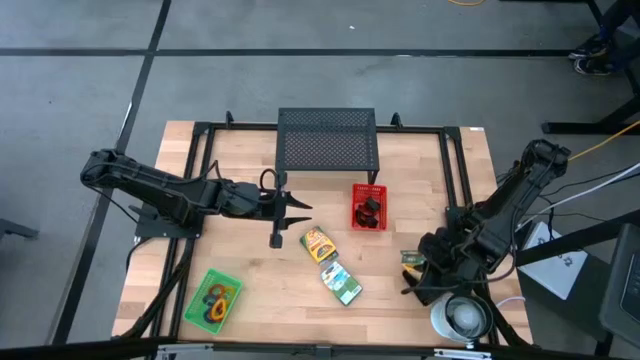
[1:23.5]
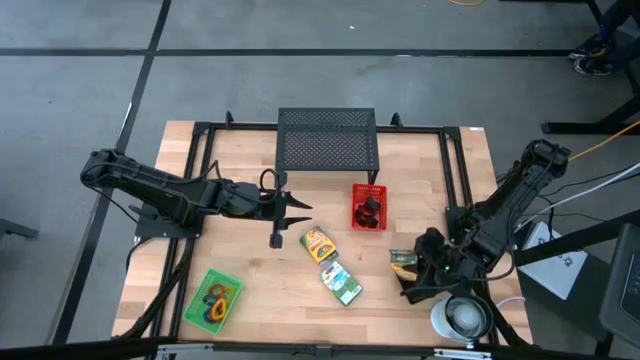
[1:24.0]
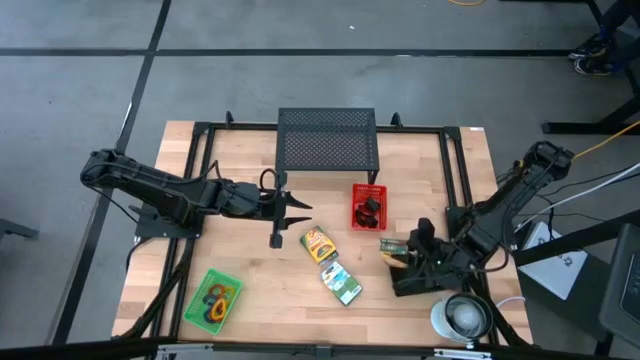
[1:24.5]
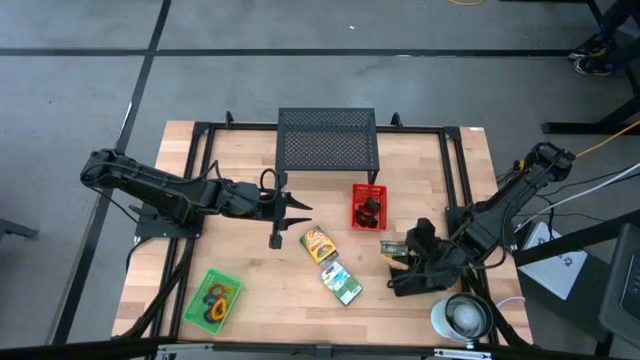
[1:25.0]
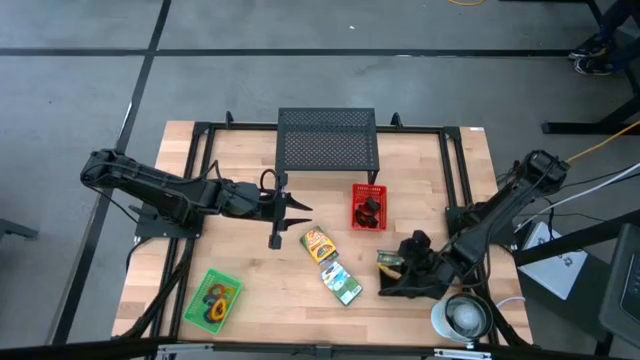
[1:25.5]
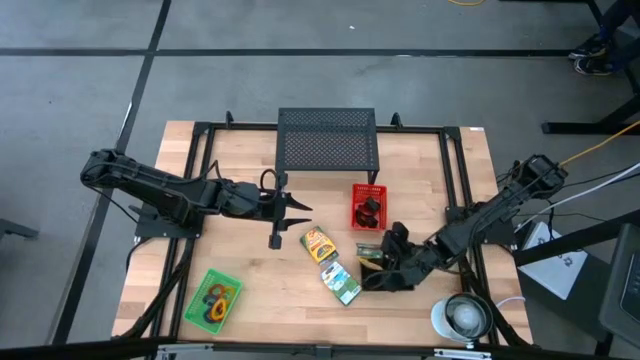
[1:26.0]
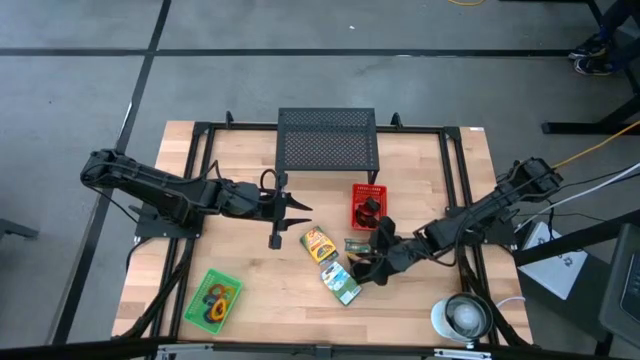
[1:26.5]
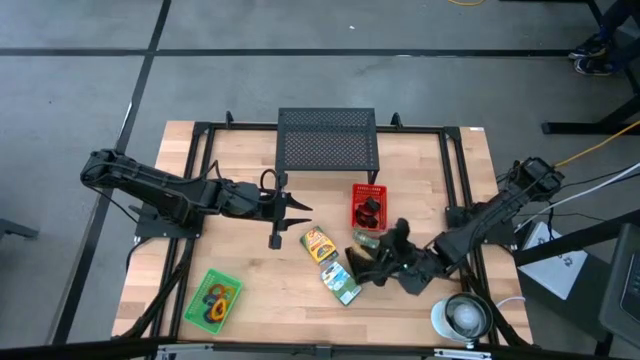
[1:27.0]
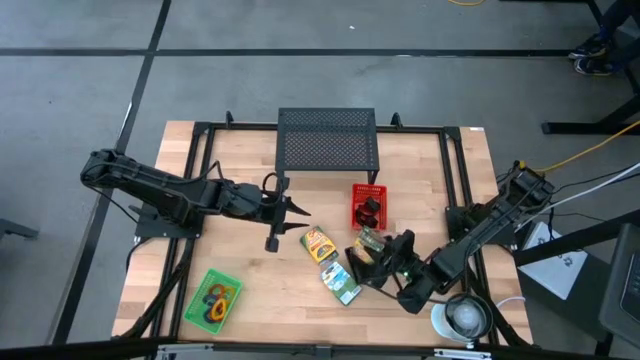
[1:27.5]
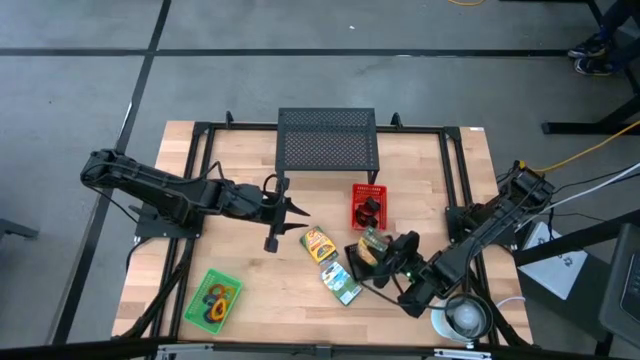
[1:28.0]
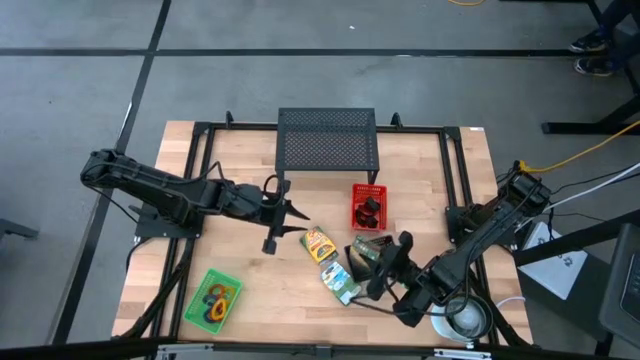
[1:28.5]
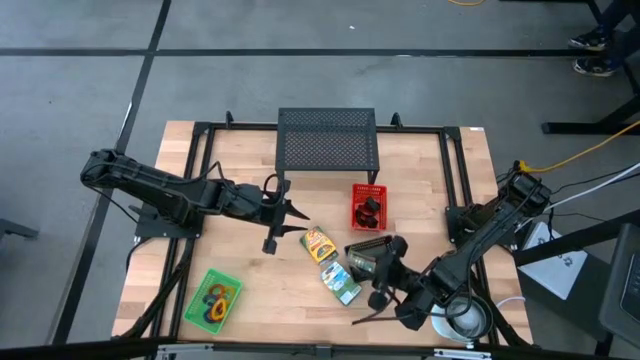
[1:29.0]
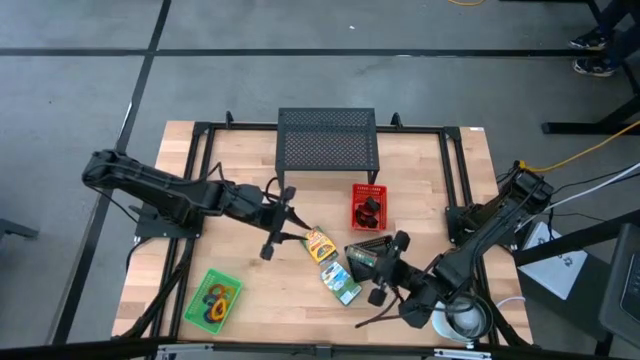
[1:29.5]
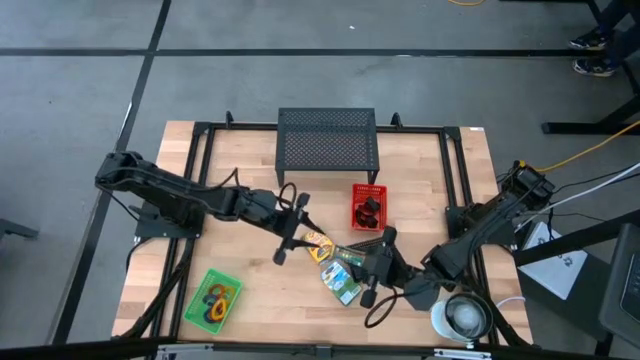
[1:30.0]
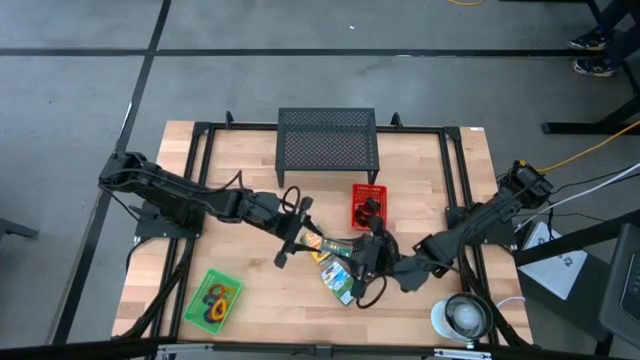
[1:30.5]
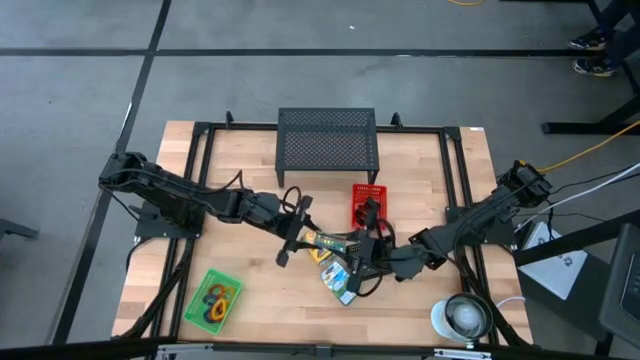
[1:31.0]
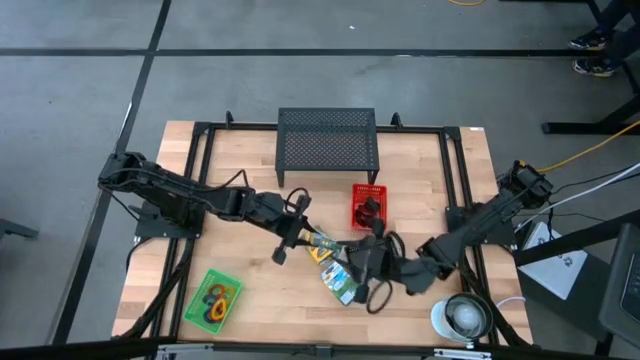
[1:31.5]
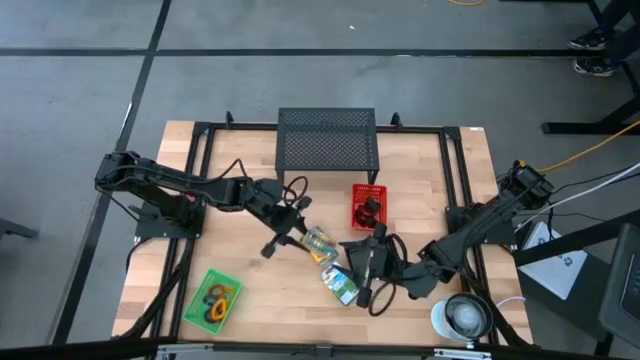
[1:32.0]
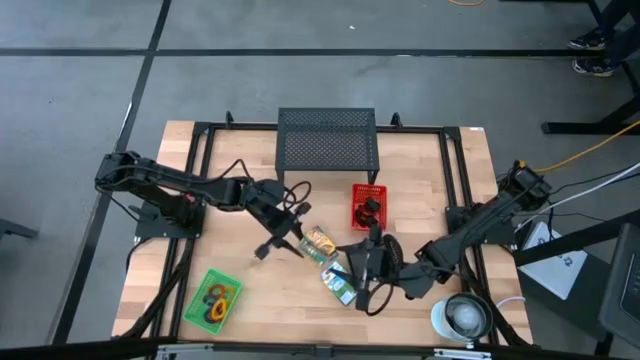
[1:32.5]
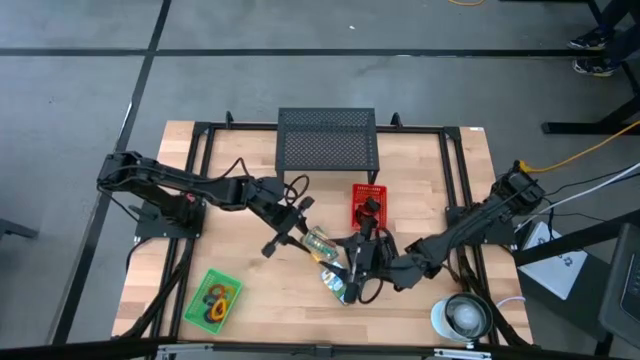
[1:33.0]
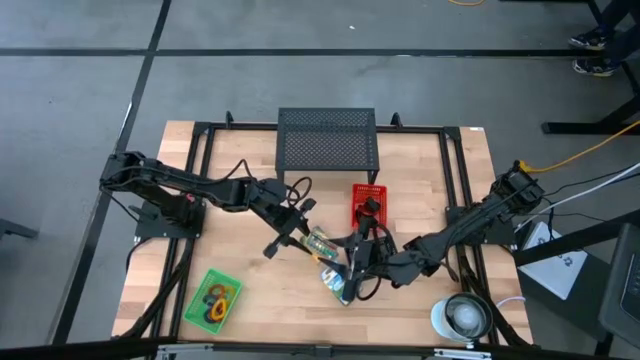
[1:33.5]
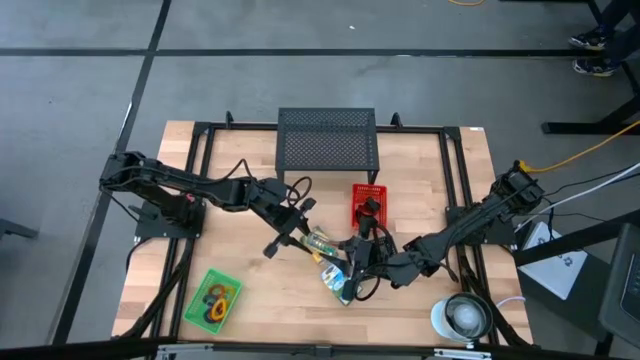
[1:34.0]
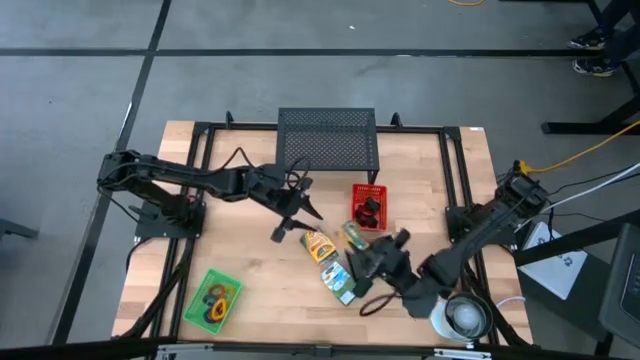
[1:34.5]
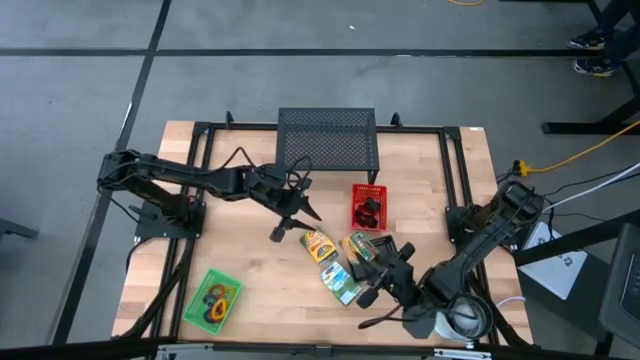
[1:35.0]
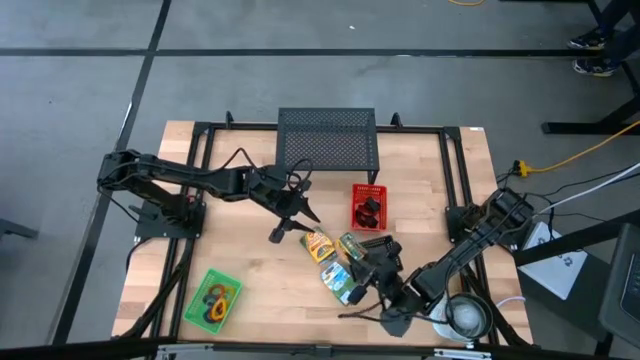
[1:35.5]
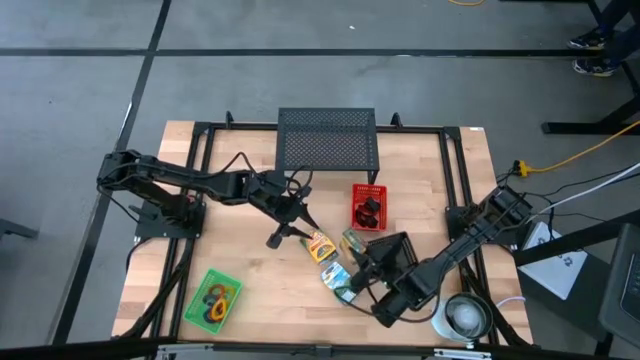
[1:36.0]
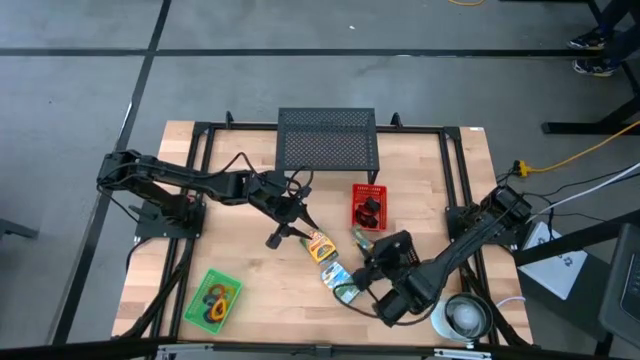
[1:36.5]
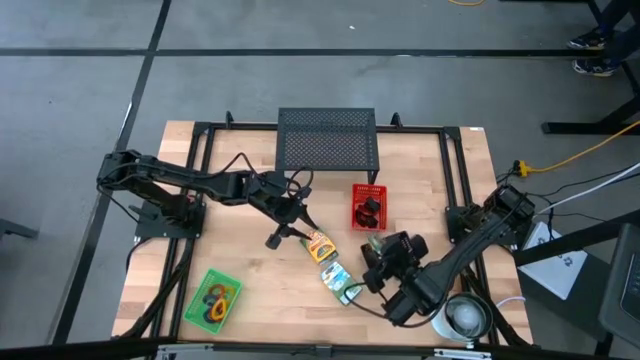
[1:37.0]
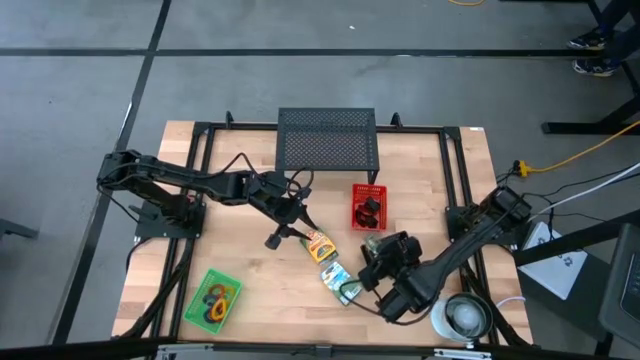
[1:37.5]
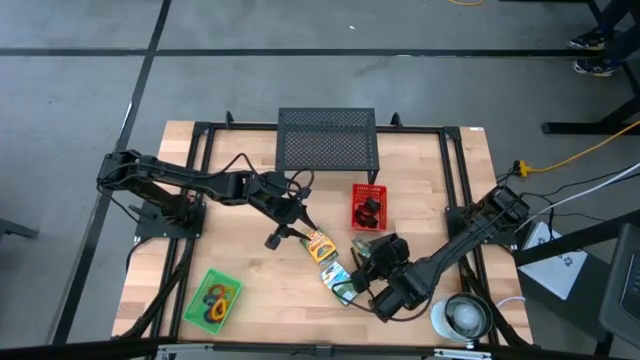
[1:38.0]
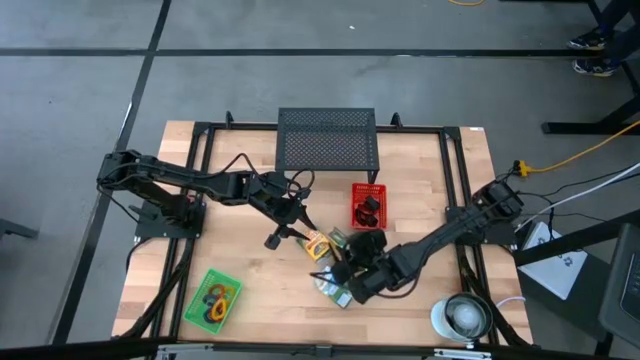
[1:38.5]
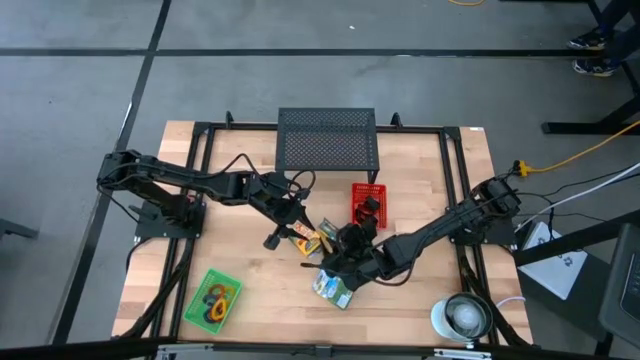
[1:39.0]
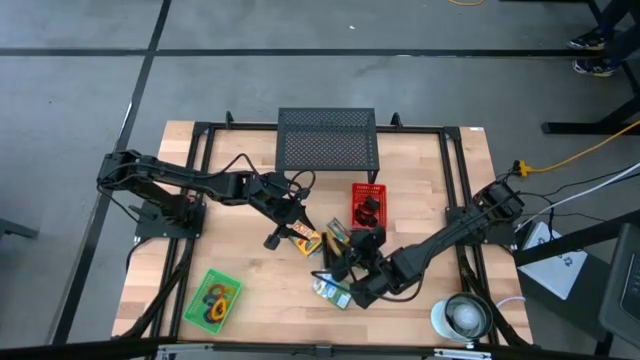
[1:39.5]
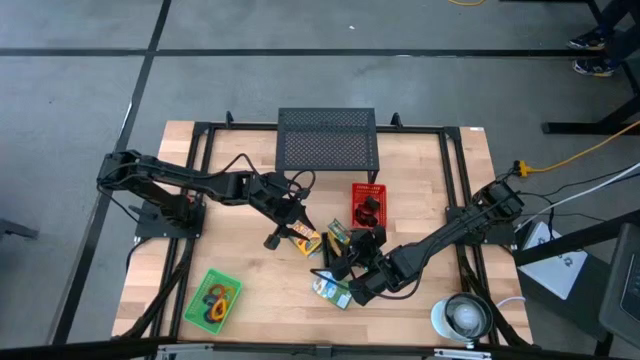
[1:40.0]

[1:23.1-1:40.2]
Task: Pick & Place Office Desk Supplies
Put the crayon box into the black bin

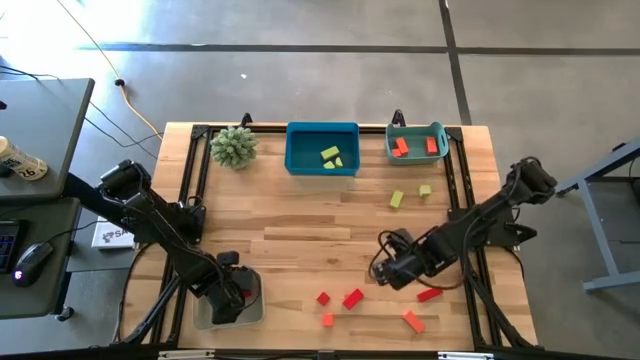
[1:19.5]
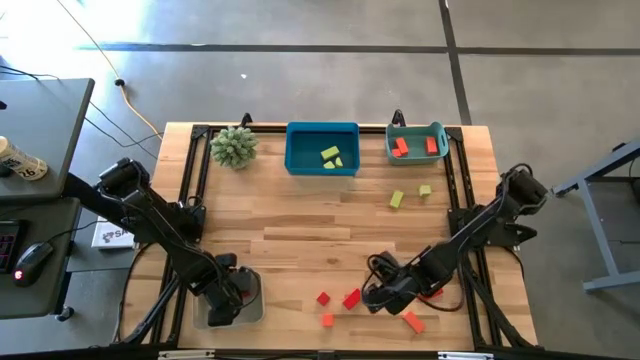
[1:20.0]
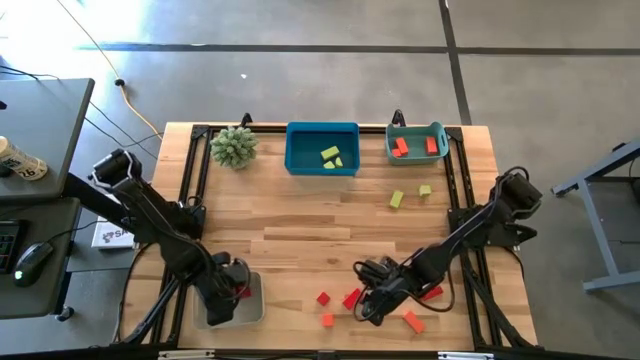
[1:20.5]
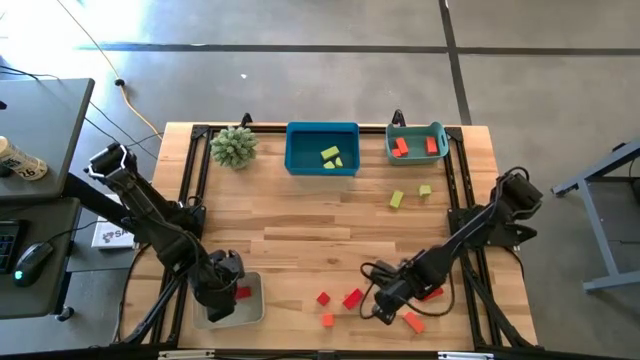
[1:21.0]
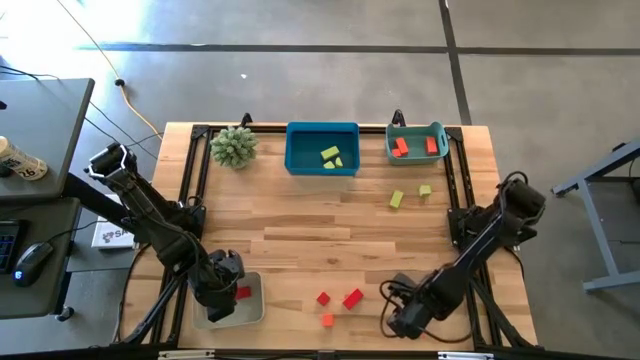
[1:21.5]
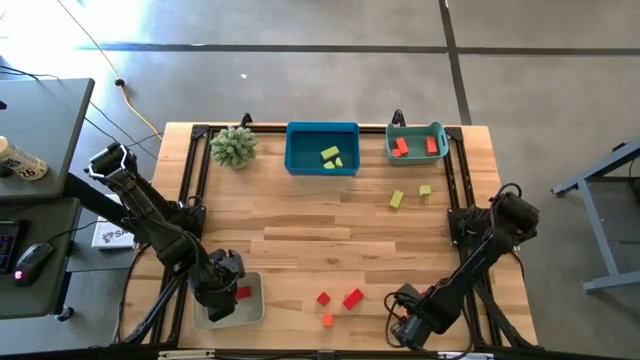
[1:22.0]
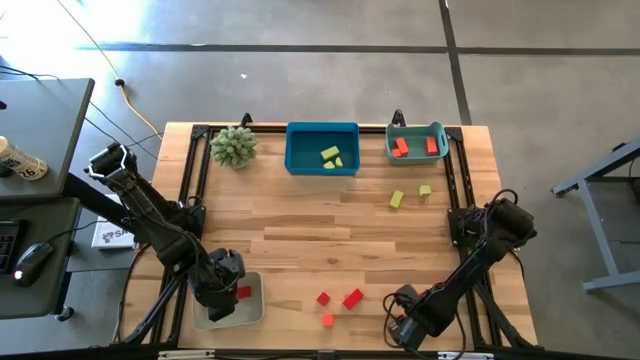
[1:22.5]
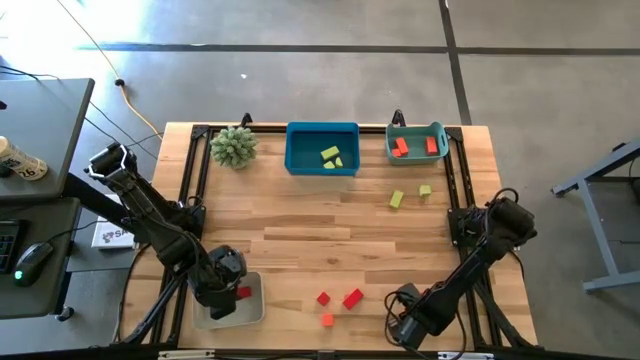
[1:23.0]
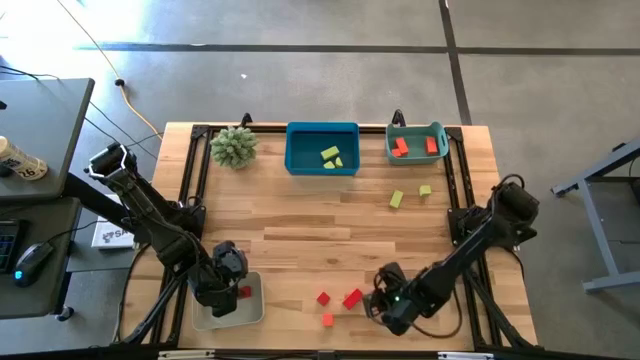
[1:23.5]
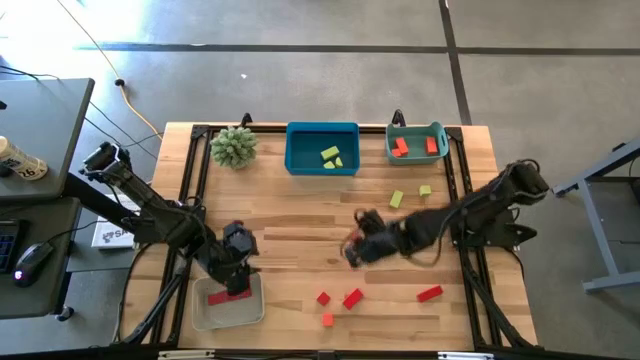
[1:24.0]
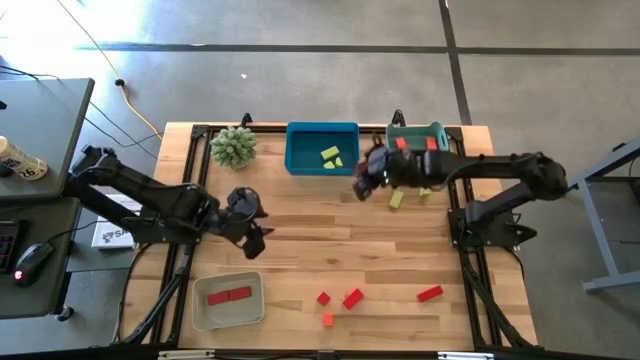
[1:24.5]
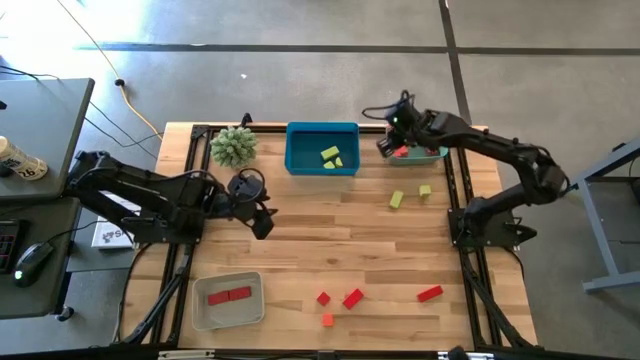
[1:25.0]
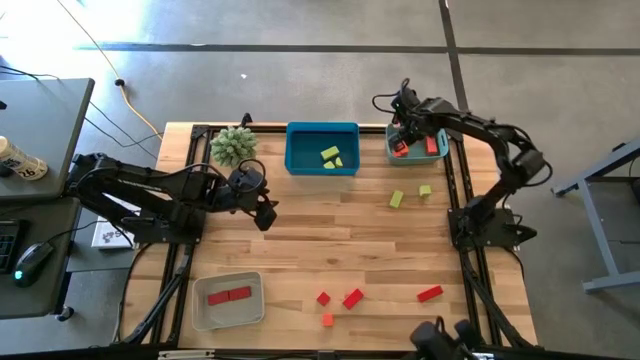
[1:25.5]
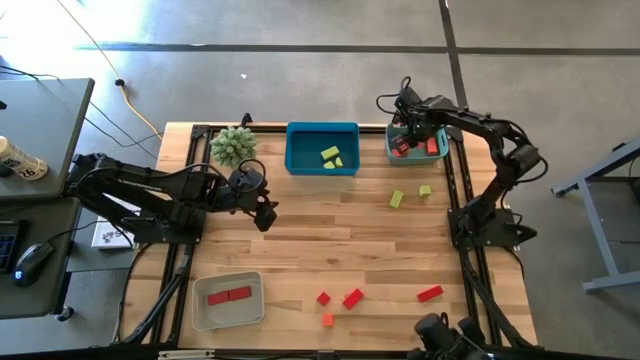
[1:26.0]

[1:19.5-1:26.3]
Task: Sort & place blocks by color
Put the orange block into the green bin
